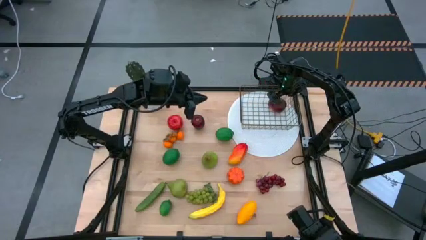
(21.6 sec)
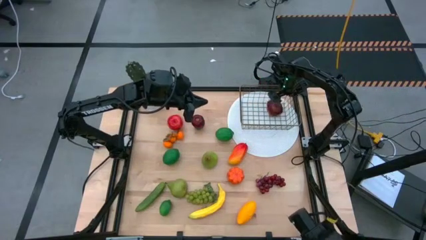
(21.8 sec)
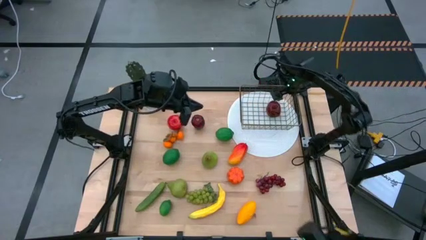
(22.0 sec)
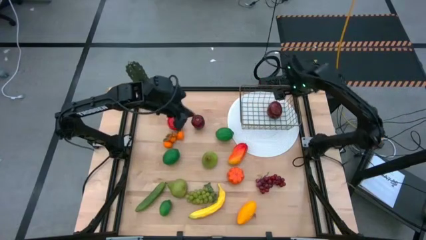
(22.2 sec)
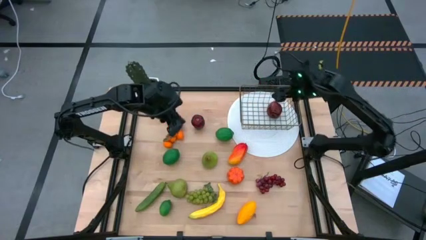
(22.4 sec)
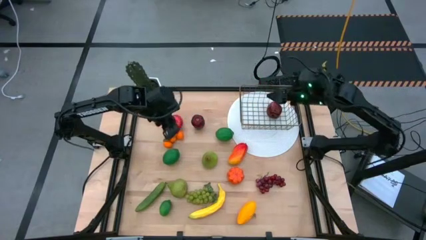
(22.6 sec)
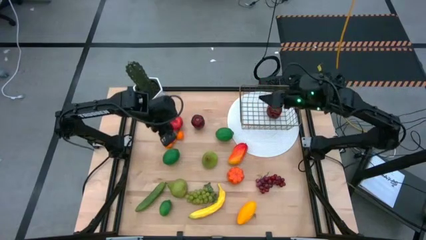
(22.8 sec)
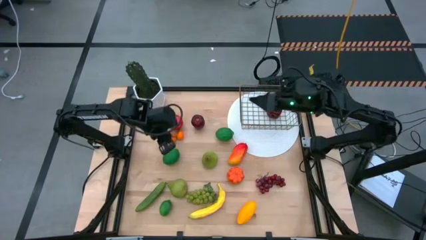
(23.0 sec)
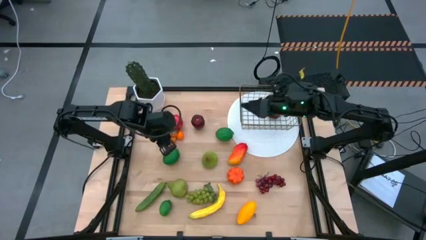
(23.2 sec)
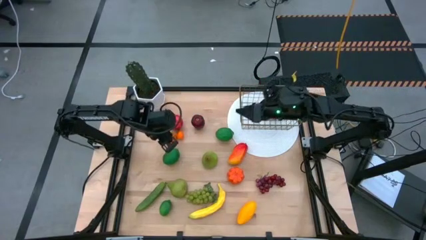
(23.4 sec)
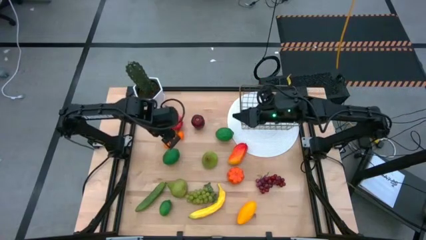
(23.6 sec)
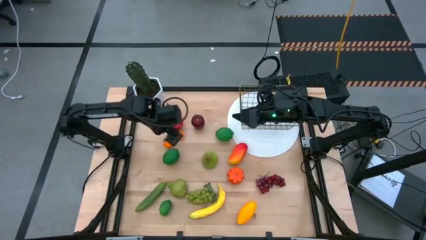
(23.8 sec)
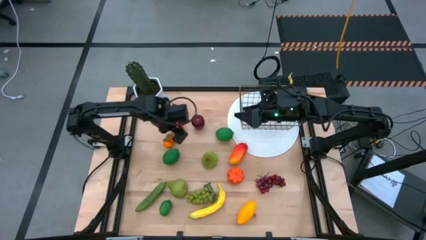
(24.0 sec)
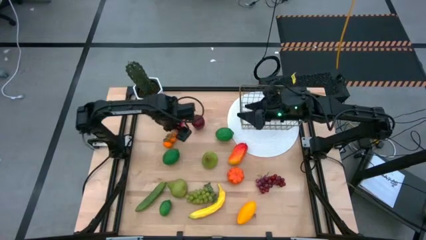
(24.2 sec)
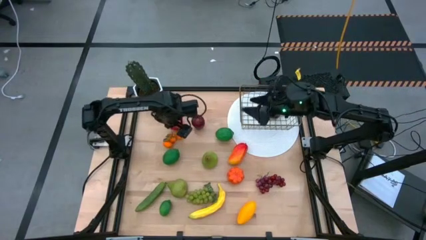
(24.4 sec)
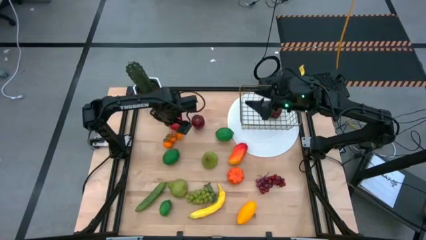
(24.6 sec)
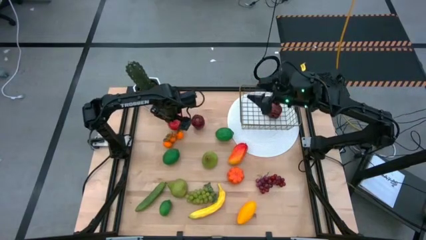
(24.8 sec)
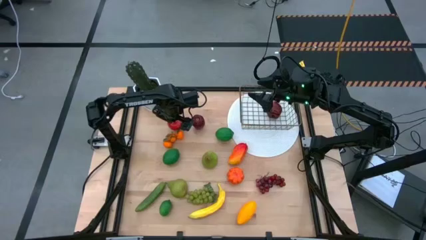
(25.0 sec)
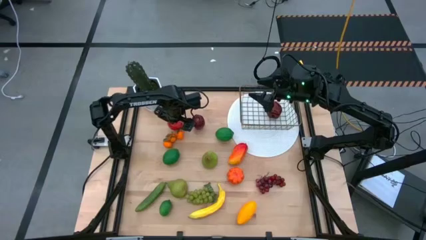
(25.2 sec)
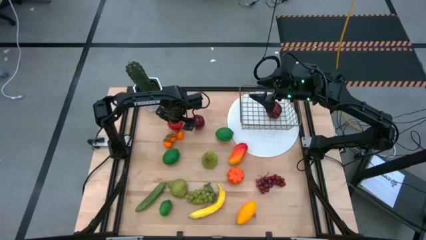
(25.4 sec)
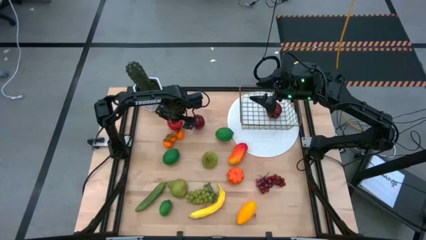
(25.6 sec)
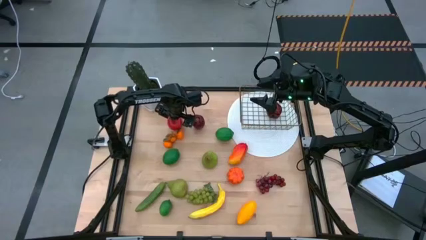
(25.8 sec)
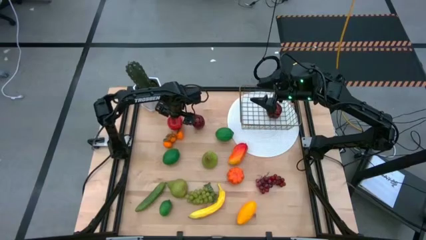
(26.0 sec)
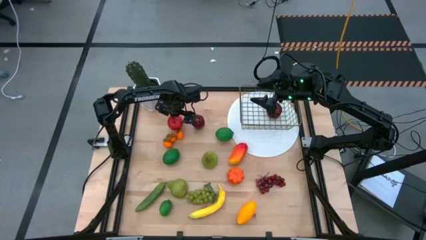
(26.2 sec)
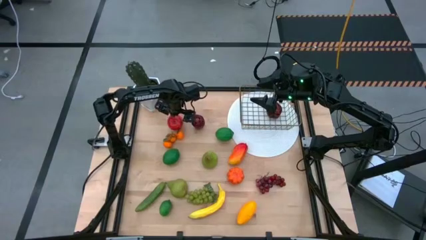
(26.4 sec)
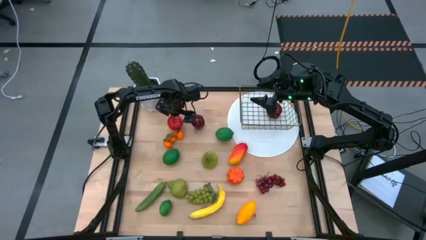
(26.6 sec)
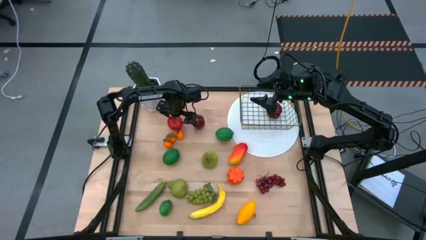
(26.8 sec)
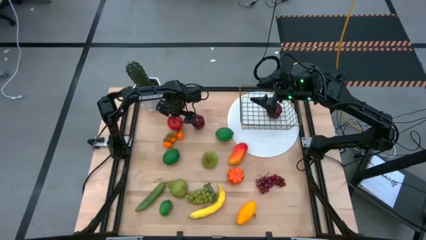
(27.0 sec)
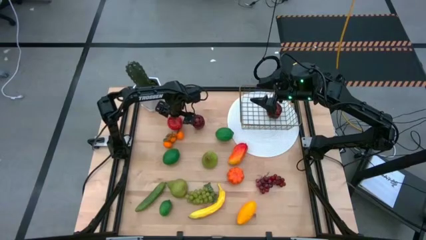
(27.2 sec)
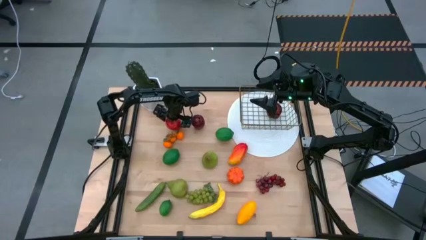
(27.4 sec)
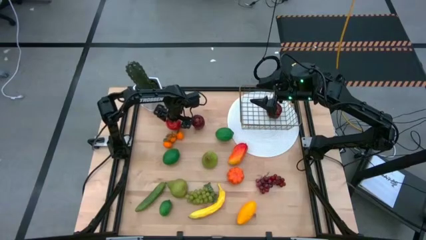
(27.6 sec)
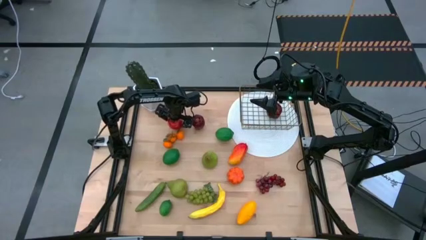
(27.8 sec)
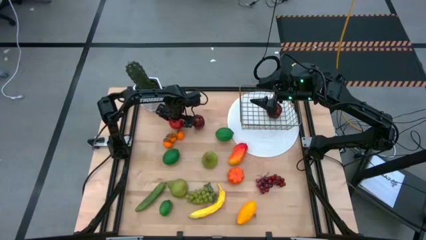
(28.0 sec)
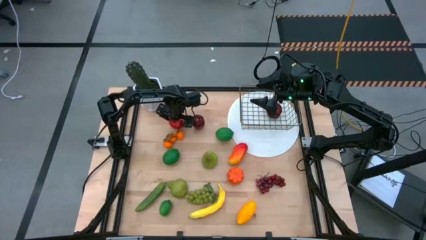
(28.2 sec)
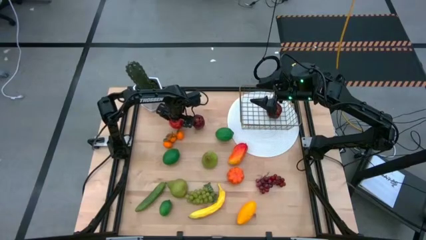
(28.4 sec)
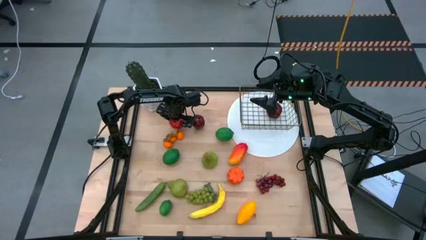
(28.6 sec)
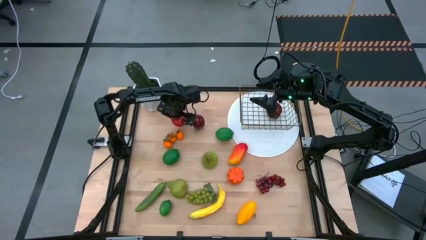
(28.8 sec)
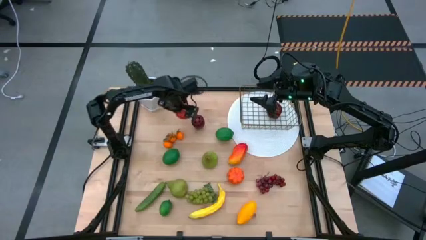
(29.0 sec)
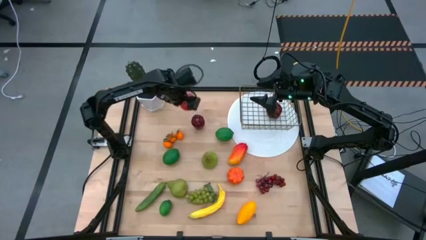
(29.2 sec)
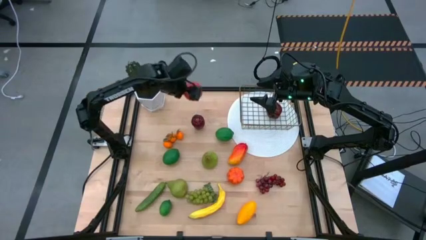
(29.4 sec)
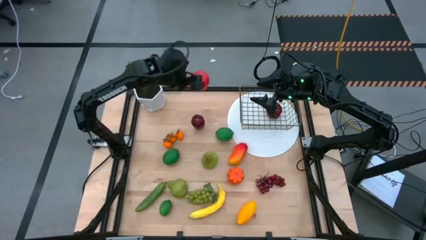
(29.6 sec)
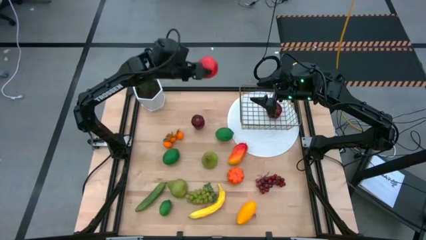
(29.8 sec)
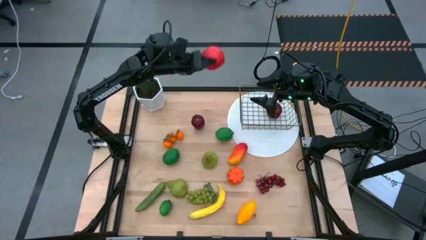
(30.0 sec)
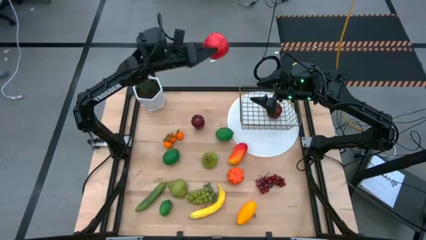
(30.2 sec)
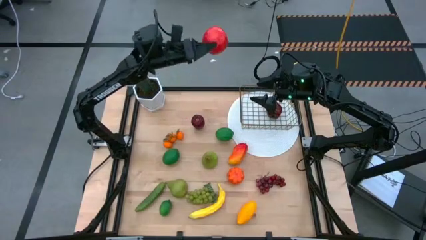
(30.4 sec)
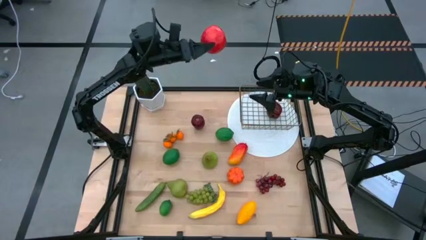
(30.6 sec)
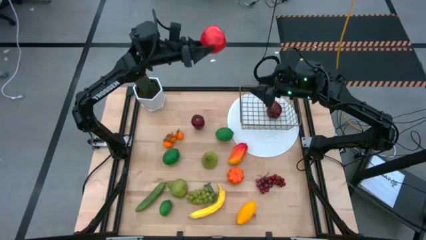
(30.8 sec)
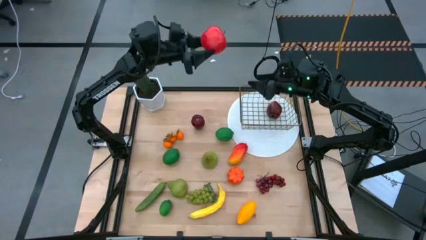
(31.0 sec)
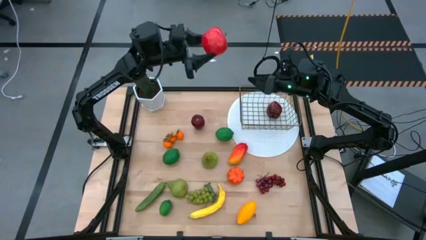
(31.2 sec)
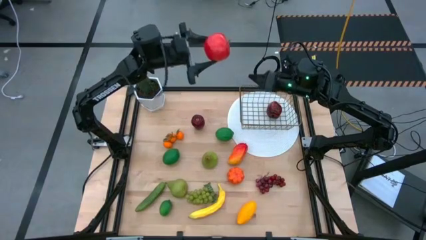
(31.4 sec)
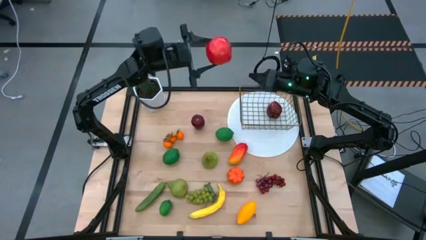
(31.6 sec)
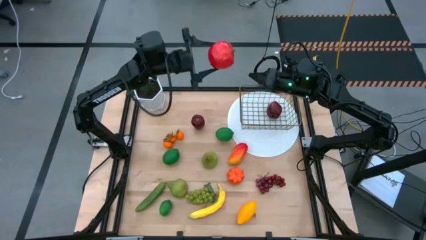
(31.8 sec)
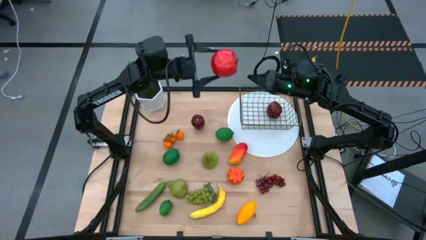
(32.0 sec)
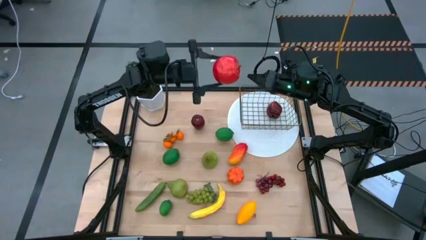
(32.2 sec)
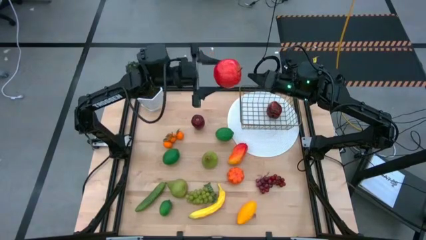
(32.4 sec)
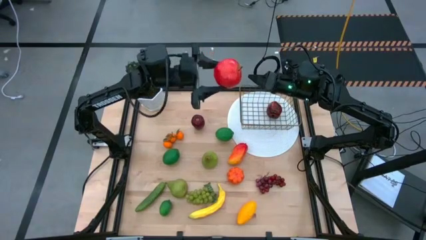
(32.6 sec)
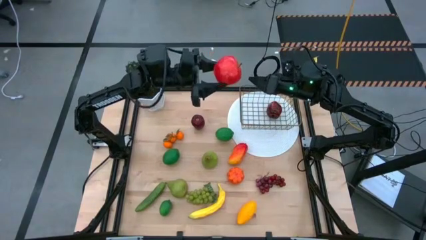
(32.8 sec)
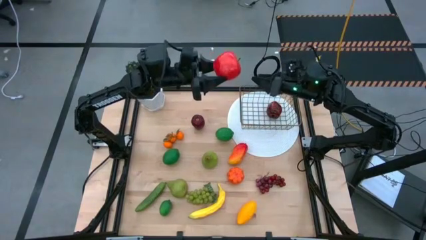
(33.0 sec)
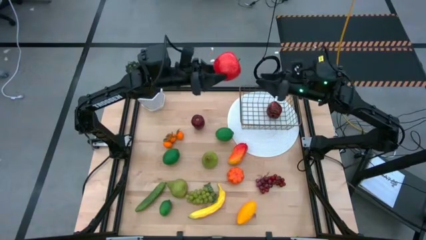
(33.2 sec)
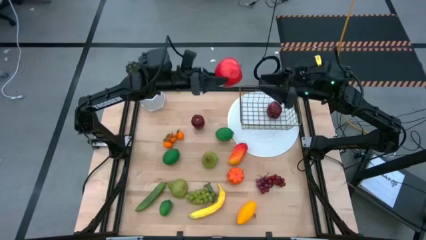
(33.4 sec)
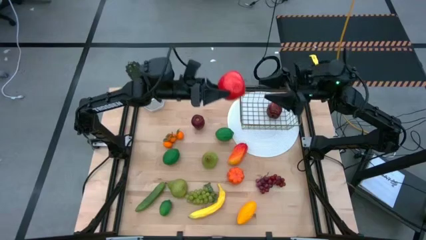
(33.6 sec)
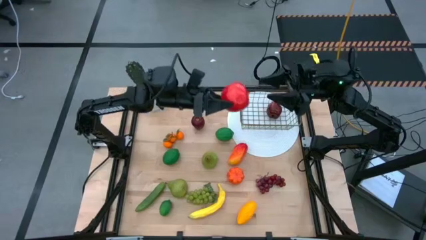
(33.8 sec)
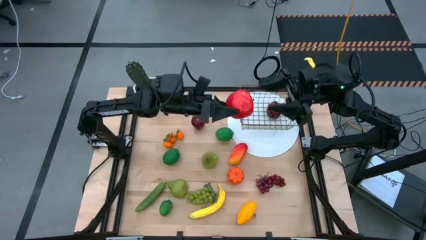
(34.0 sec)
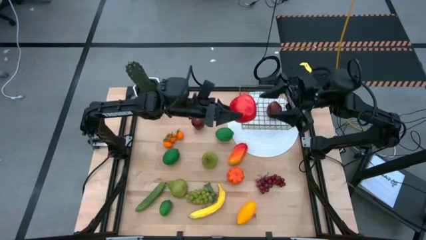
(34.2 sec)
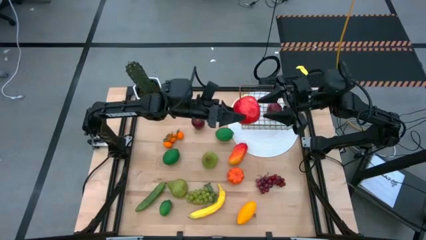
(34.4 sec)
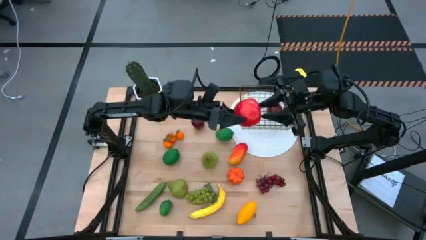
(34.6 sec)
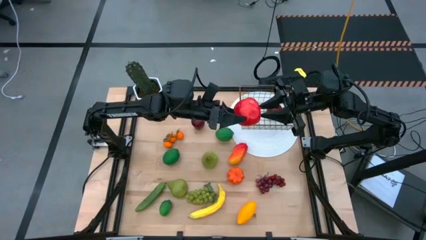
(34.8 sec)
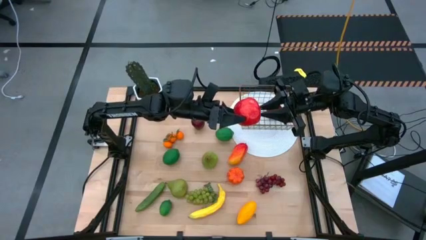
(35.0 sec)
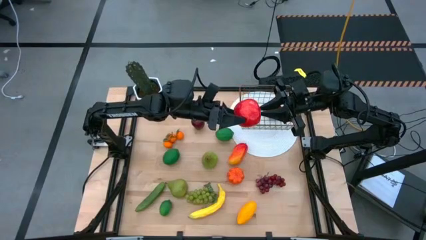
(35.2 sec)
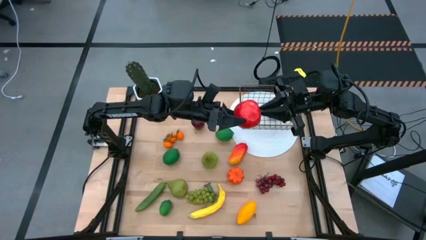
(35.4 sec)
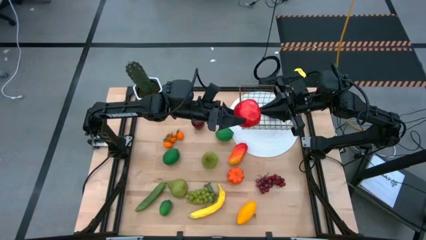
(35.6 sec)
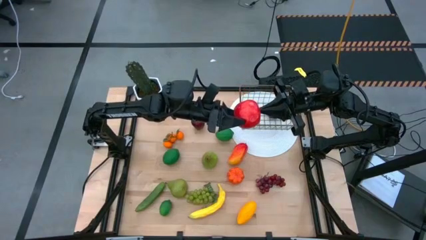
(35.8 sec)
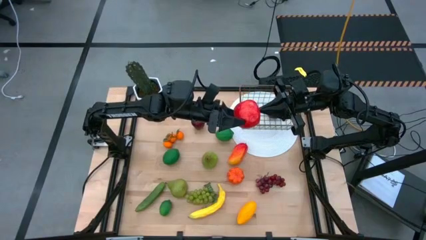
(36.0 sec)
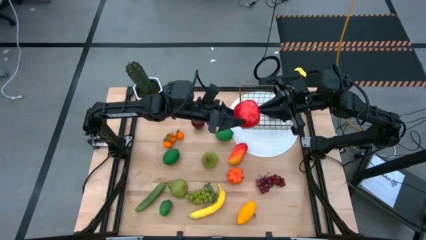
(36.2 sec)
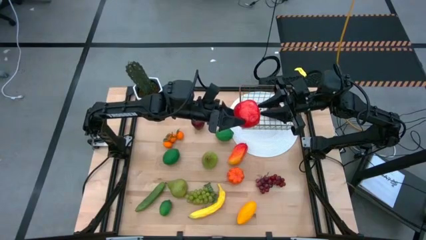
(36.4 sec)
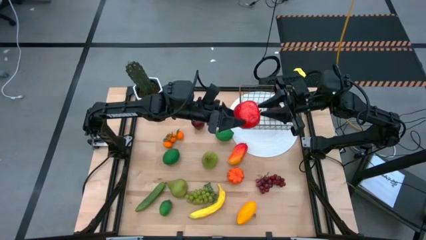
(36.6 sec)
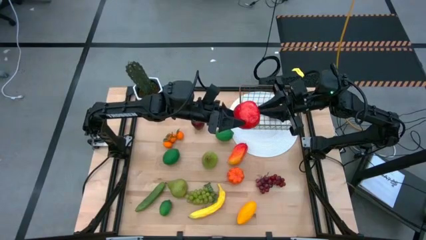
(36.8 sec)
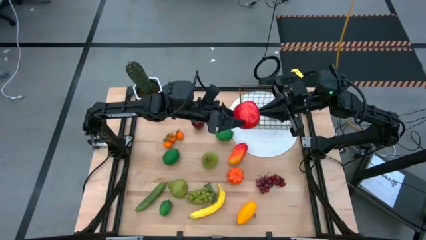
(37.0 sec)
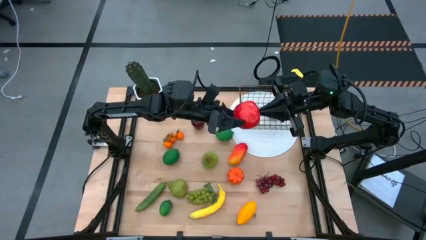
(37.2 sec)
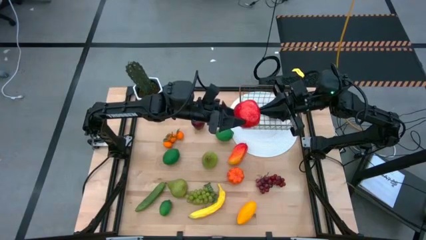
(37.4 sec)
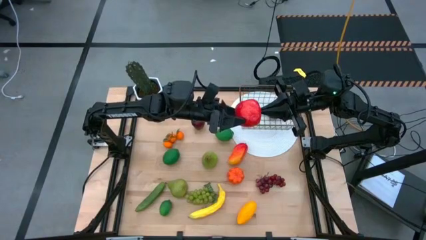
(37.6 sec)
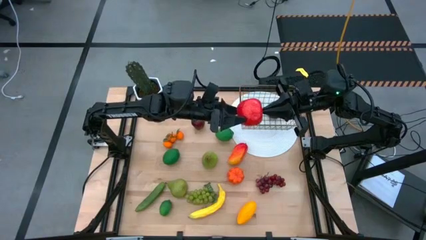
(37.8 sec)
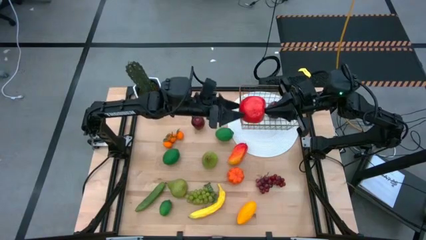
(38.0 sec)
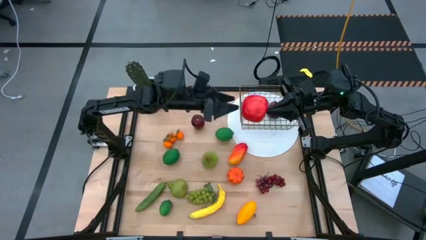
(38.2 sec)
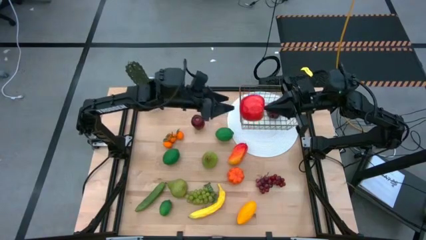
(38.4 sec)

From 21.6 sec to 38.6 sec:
Task: Build produce basket
Put the red apple into the gold wire basket
